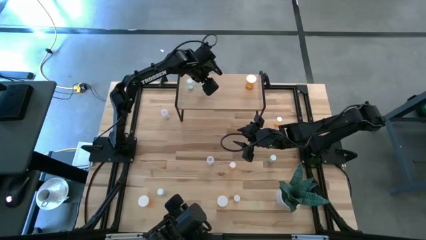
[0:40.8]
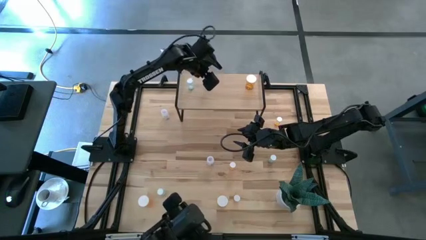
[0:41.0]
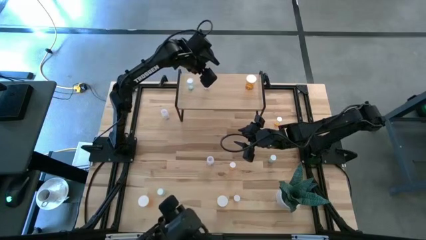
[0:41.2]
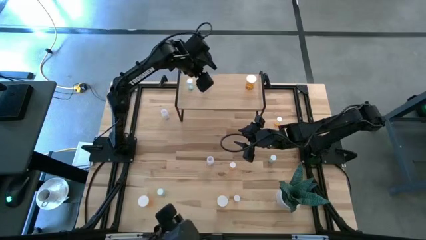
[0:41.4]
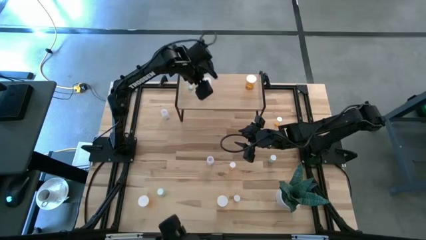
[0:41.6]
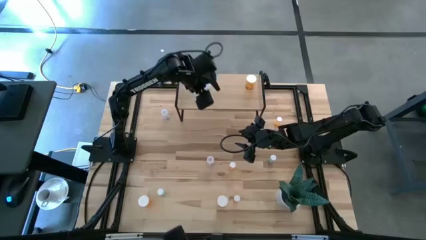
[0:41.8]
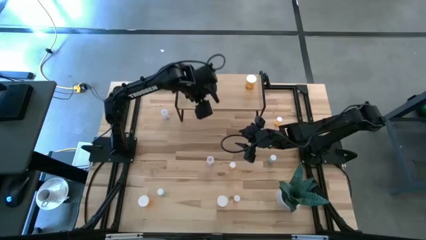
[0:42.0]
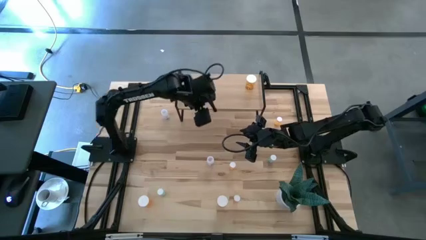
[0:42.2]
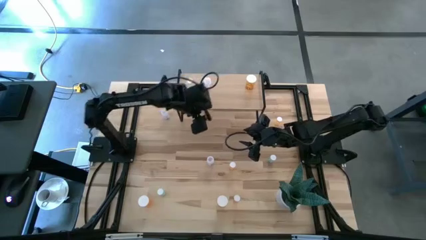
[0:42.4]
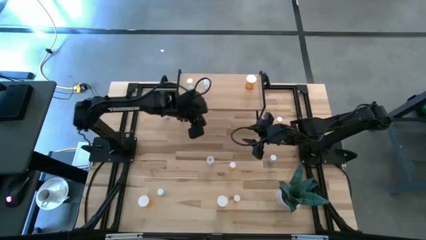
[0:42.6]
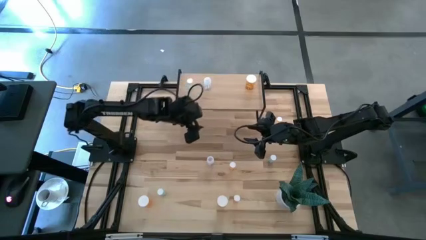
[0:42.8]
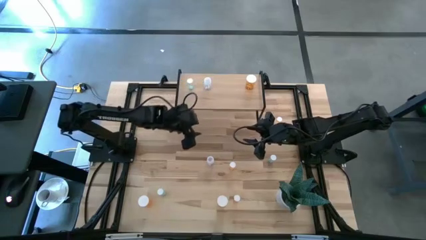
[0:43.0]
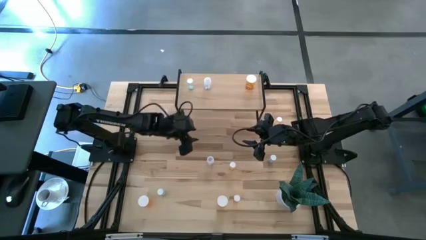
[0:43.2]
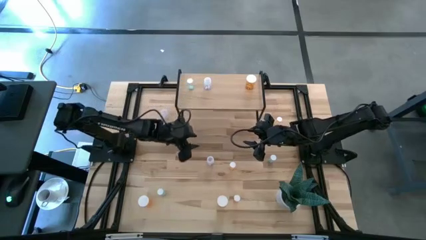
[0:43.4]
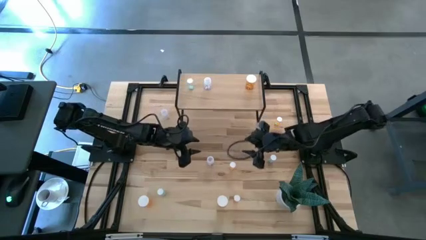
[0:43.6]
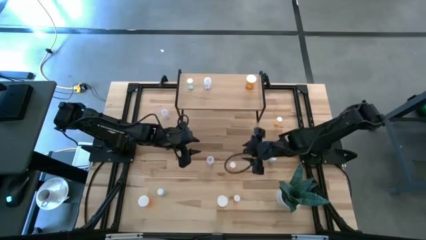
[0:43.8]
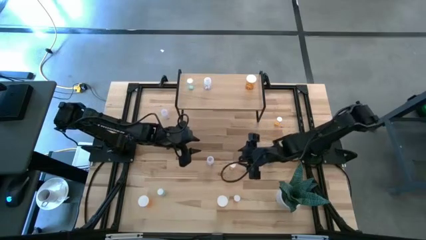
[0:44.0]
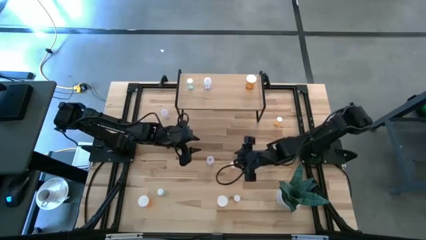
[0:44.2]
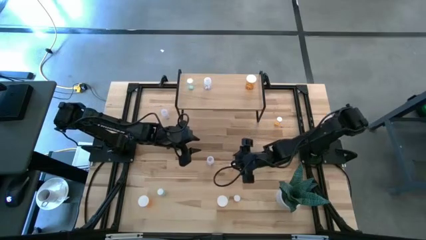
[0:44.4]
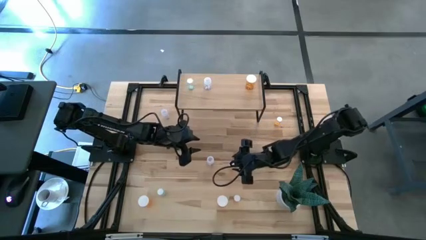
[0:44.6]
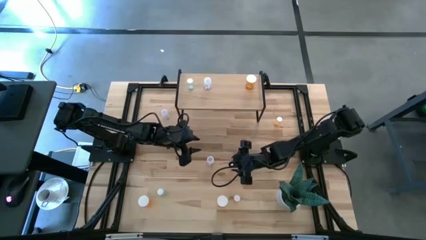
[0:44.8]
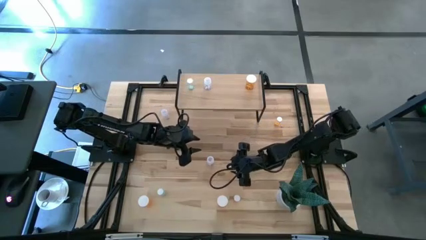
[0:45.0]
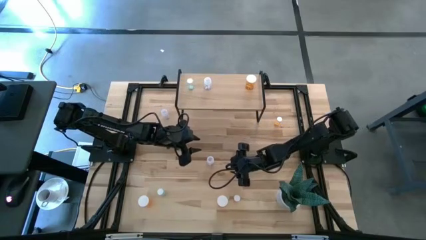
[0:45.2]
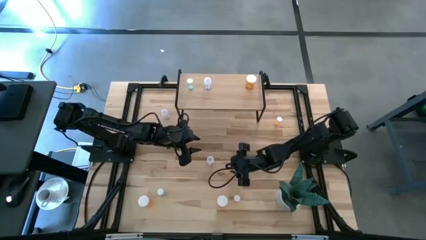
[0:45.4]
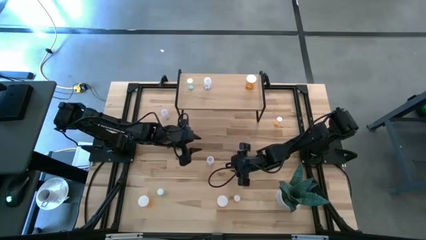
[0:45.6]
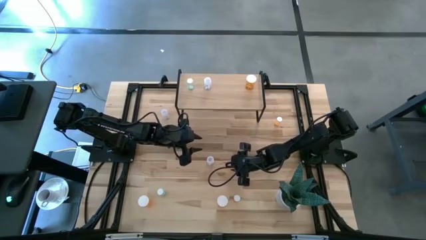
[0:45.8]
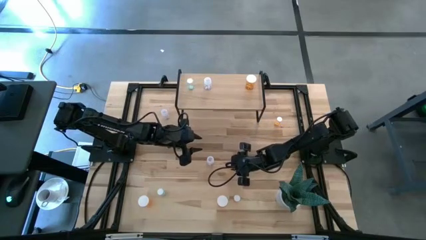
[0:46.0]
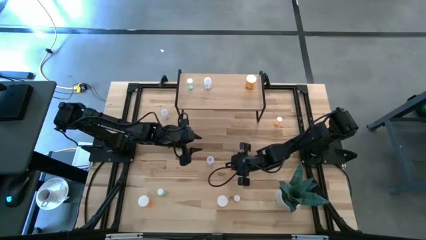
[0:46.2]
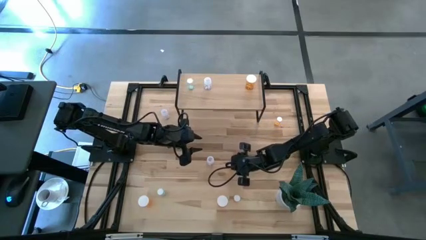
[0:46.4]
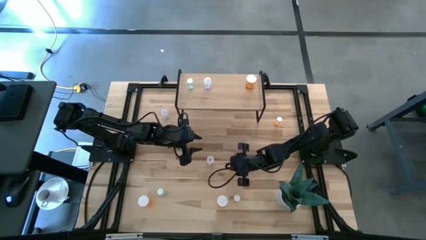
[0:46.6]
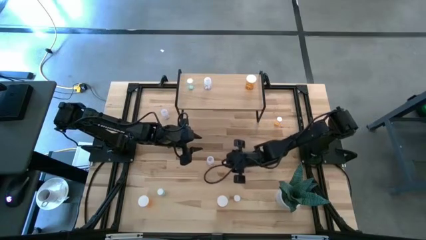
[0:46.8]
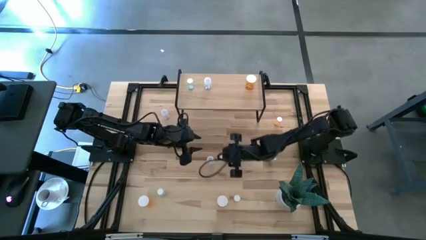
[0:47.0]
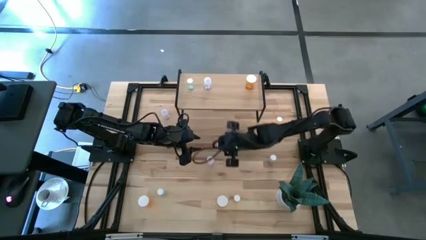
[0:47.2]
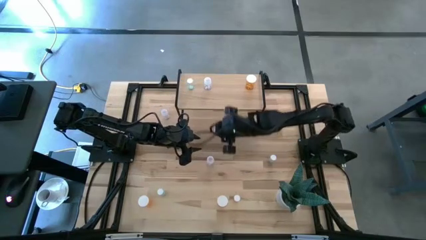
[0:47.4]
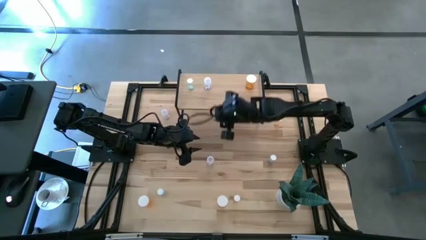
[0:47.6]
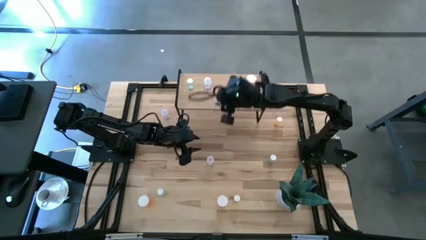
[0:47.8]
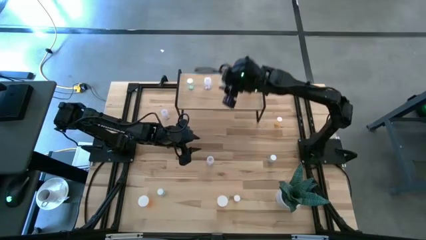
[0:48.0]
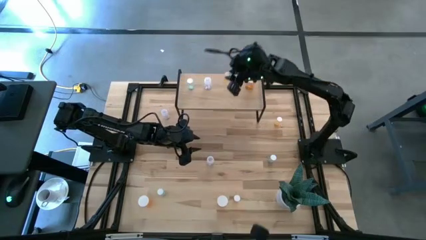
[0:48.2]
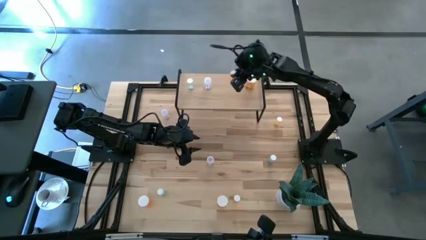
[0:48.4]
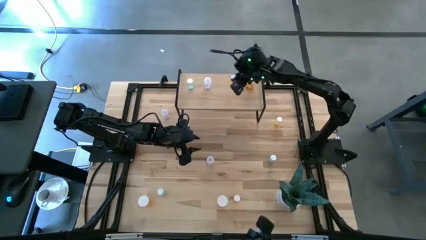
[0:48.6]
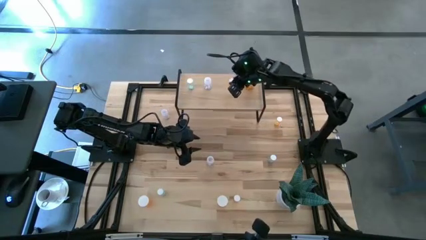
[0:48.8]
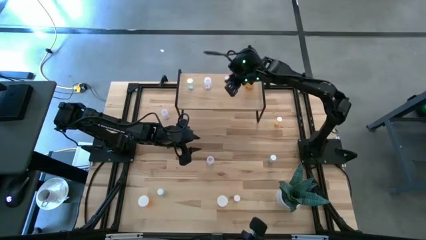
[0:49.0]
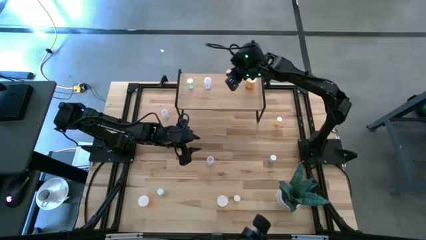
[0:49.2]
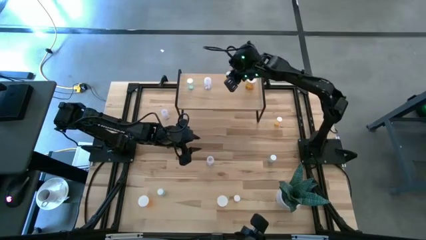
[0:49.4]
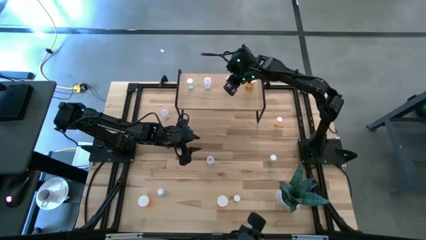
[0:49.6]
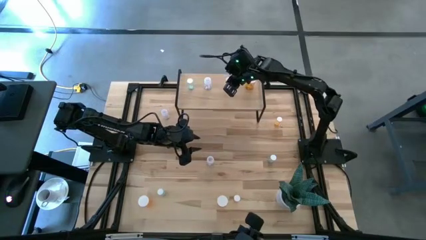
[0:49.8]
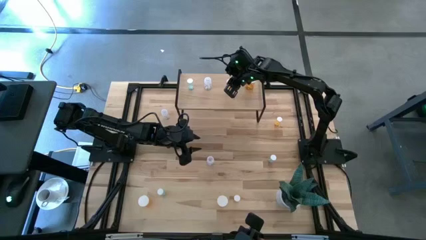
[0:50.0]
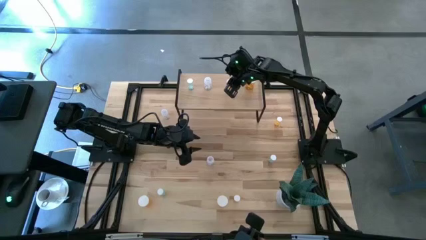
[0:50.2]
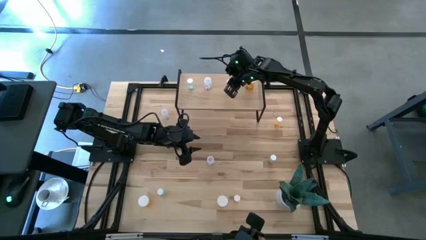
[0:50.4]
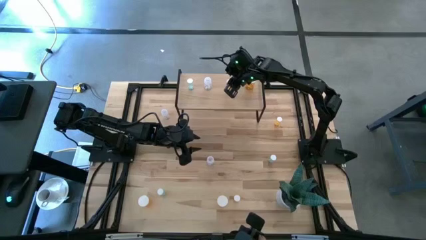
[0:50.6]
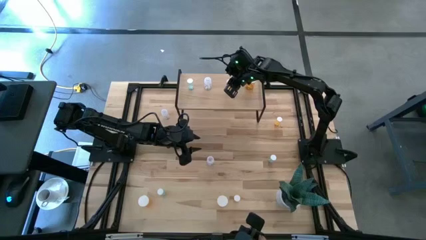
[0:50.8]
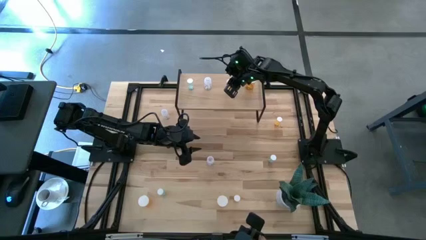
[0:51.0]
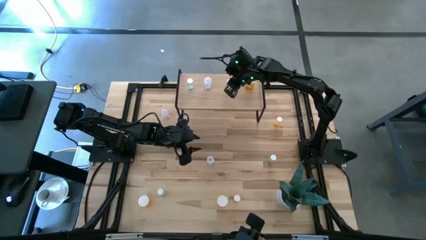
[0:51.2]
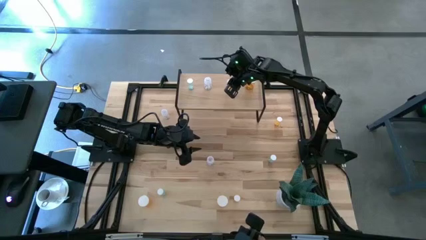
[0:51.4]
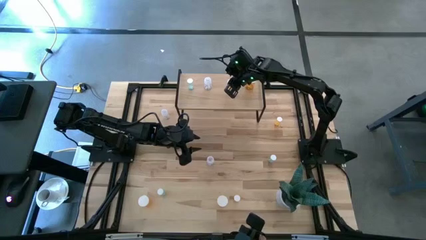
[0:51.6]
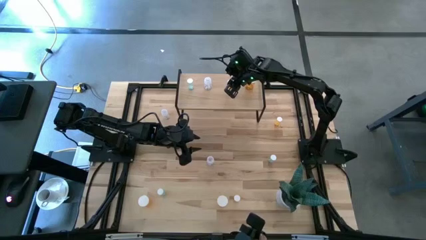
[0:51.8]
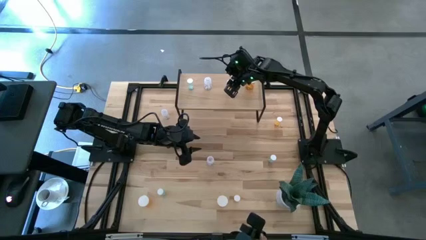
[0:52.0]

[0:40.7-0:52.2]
Task: Pick and place medicine bottles onto shelf by color
Put the top left small orange pill bottle on the shelf

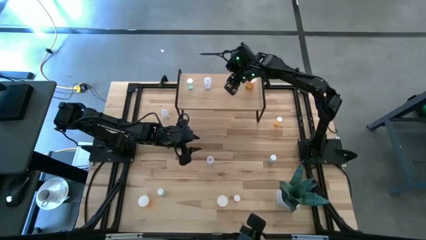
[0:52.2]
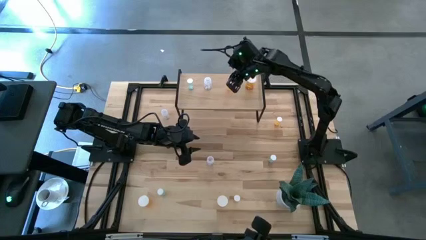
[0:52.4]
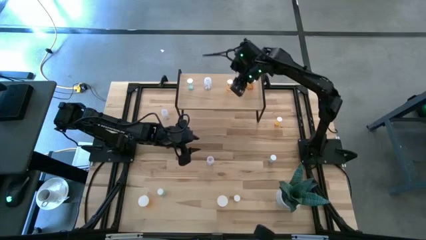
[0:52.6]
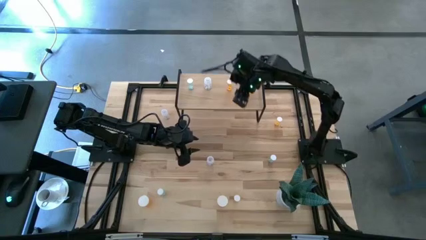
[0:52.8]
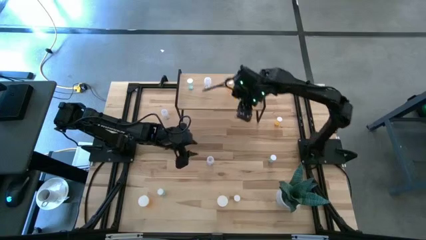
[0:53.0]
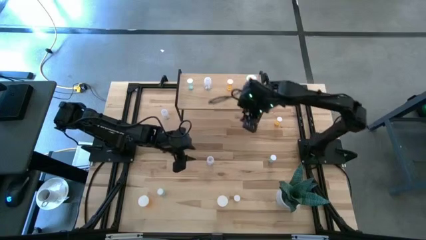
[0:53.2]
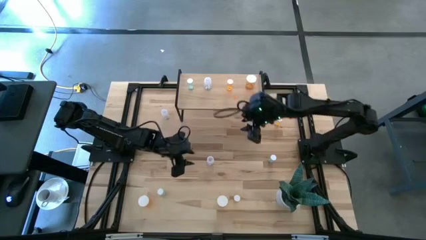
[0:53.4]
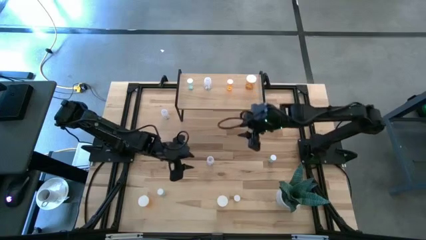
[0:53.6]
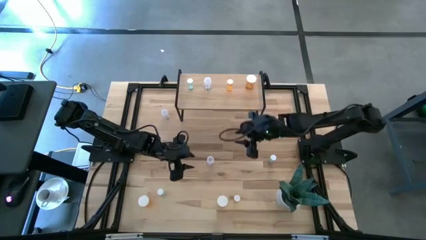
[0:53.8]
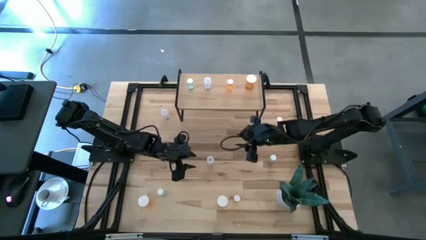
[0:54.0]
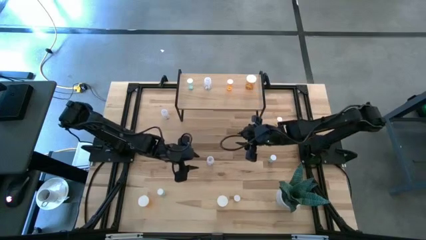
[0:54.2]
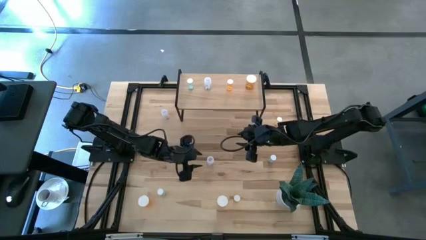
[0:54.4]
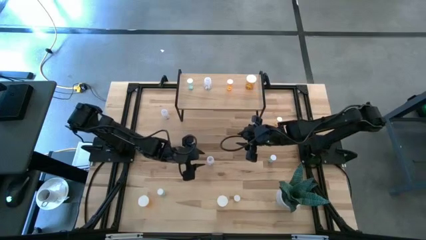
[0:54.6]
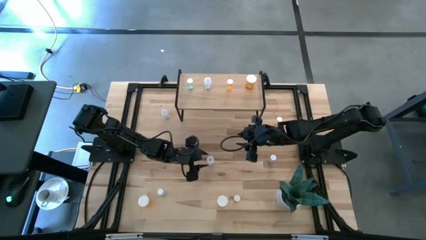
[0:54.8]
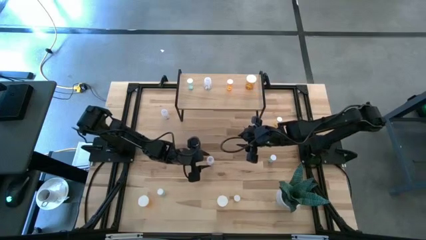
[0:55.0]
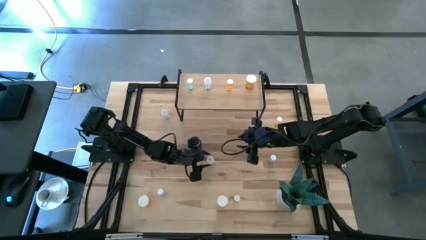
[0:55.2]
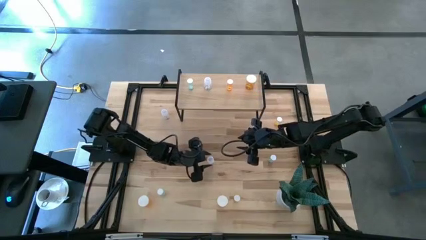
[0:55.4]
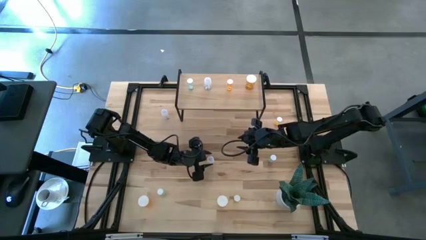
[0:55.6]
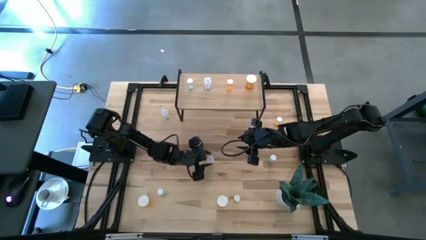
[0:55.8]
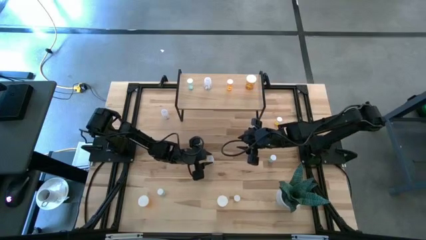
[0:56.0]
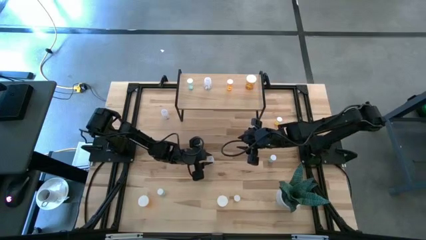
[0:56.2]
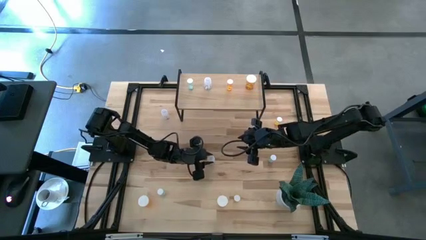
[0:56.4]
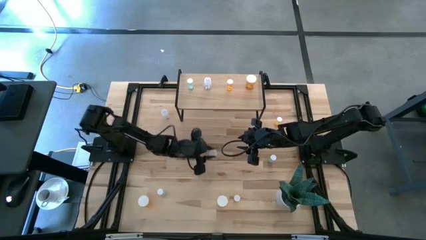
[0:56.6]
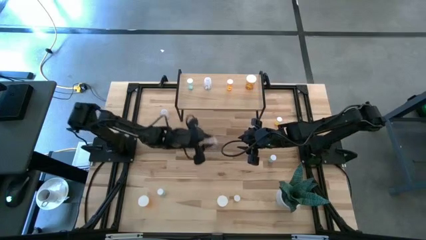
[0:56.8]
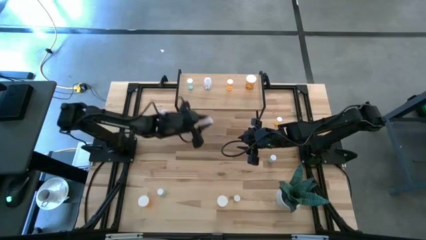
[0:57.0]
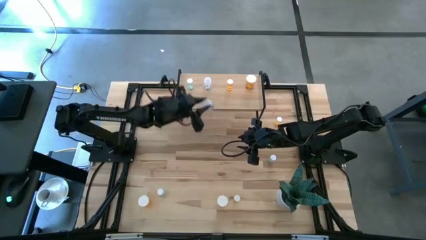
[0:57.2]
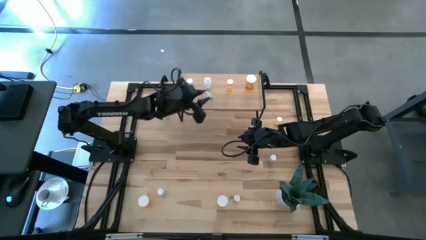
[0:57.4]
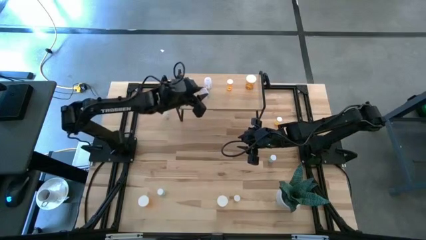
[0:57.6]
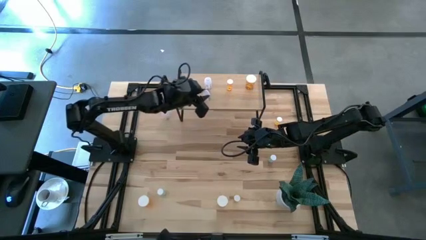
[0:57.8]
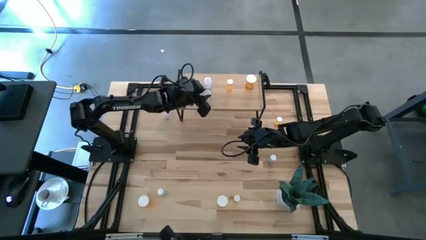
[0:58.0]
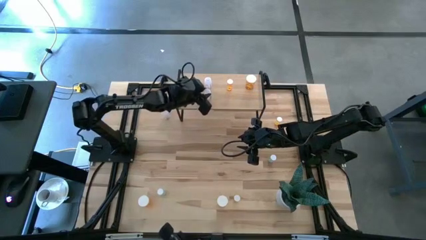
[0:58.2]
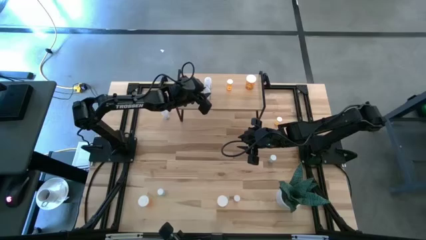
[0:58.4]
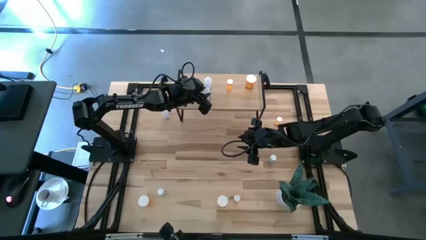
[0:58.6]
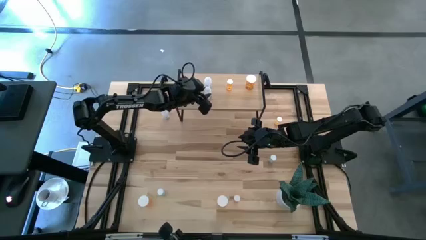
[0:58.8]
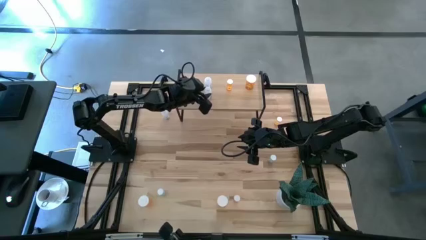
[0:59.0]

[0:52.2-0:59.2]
Put the bottom transparent pill bottle on the shelf aligned with the other transparent pill bottle
